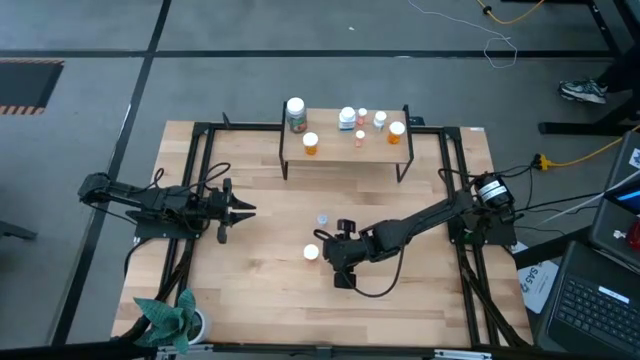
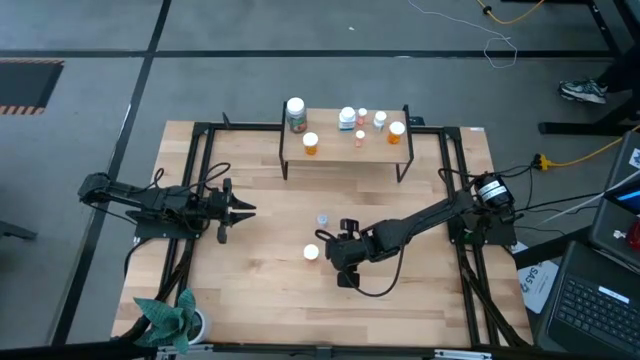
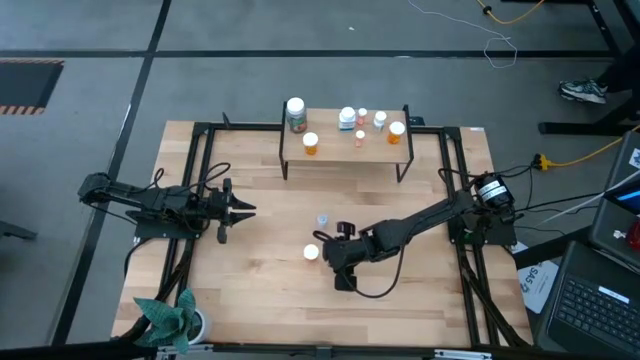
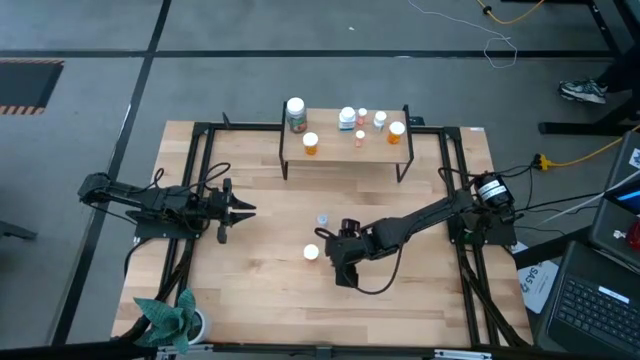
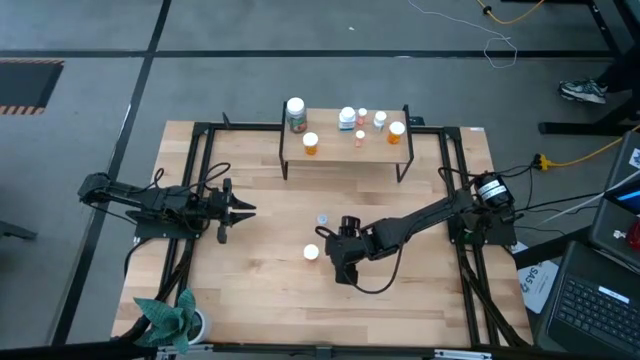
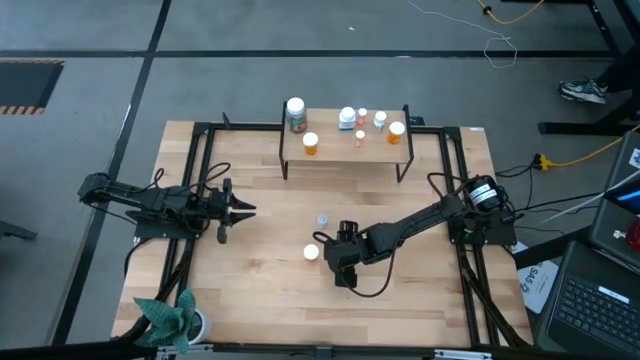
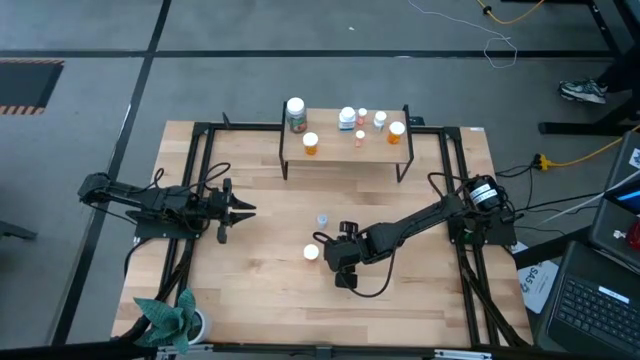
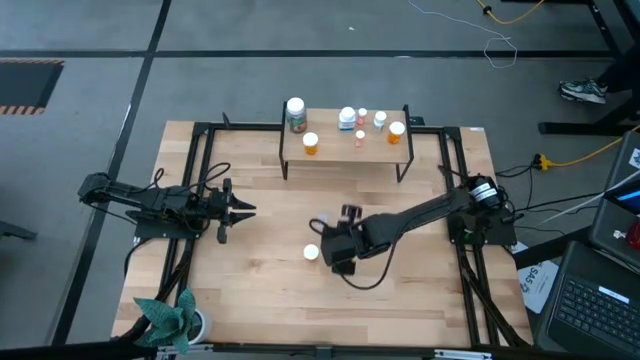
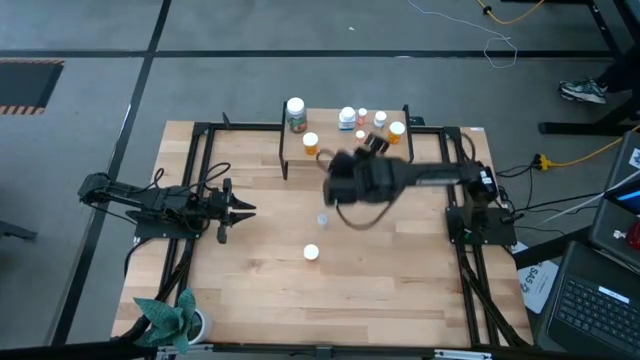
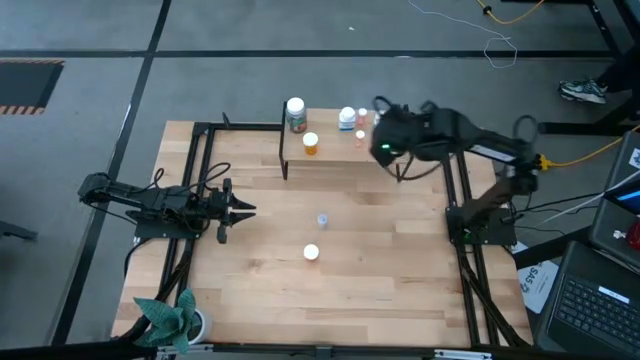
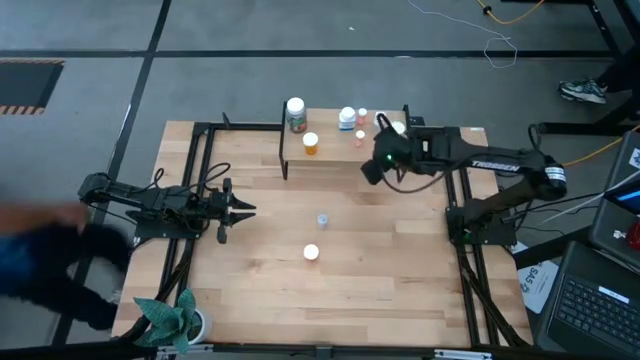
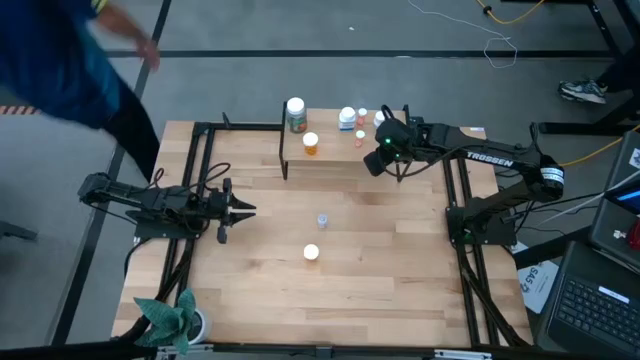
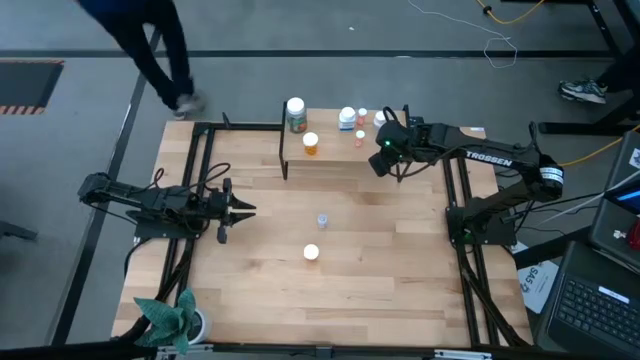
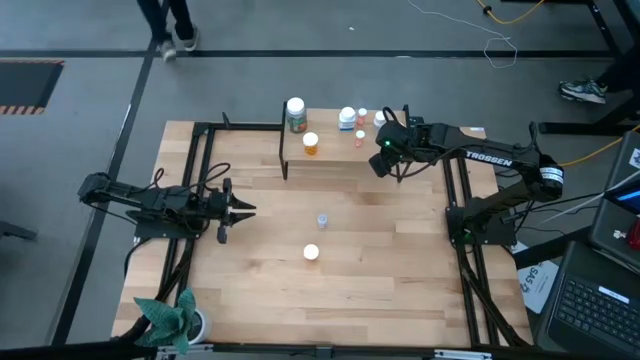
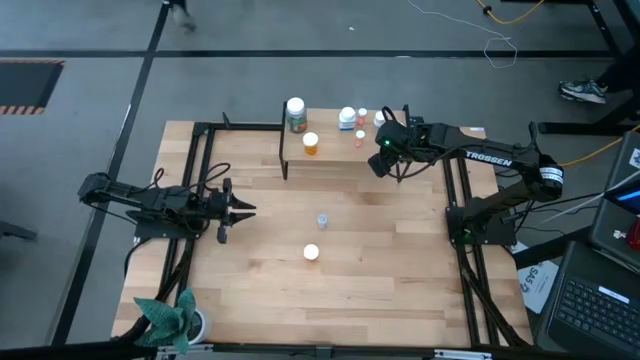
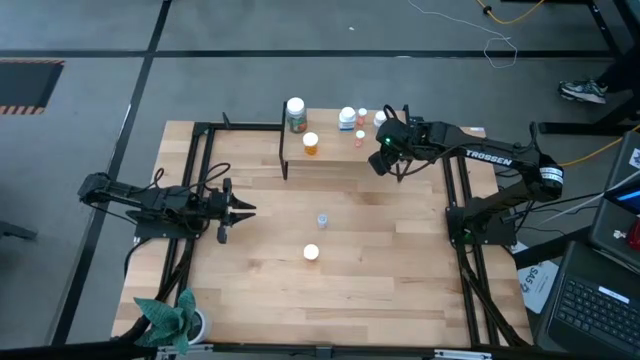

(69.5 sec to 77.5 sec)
Task: Pick and place medicine bottles onto shelf by color
Put the red pill bottle on the shelf

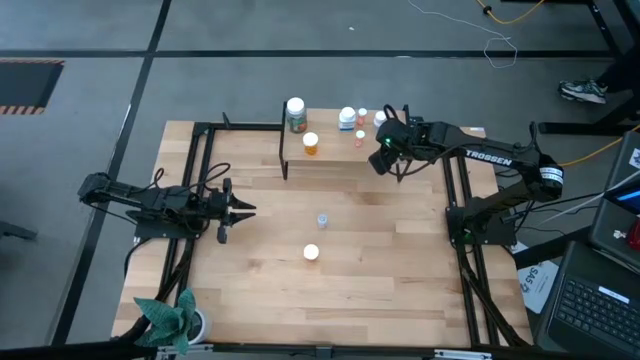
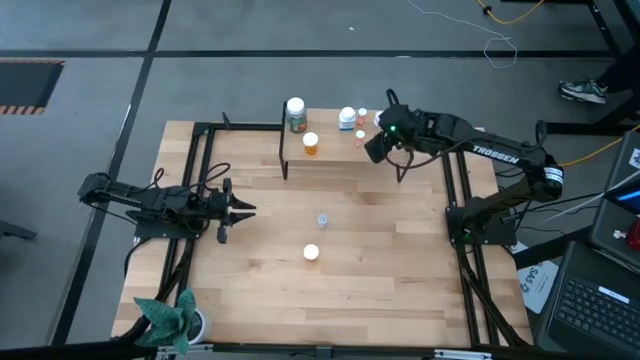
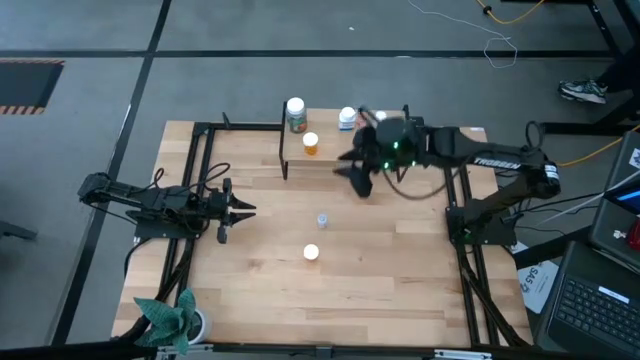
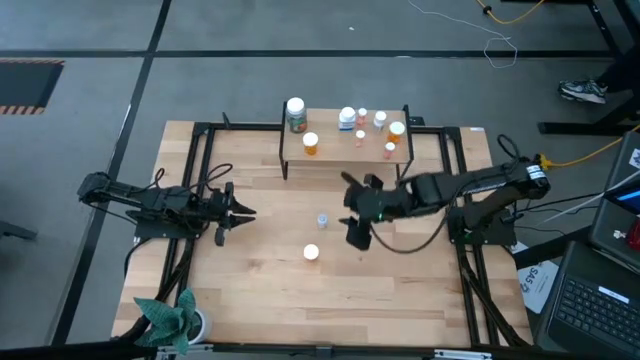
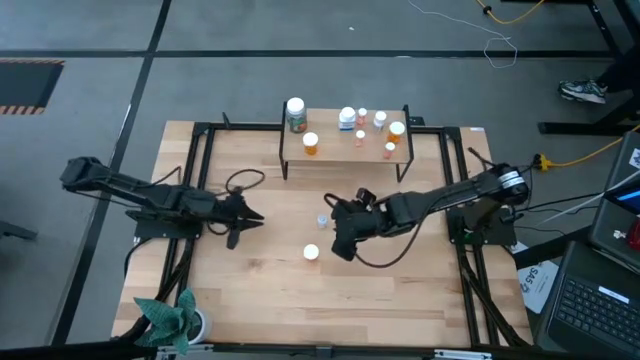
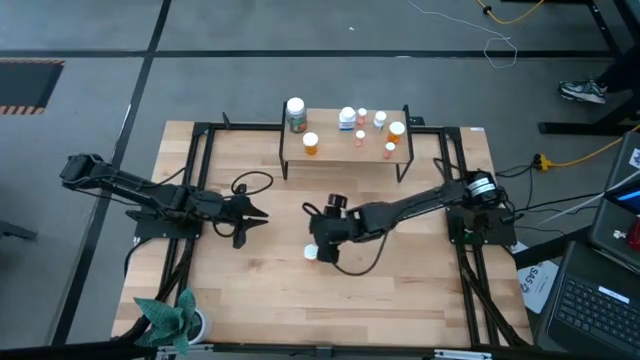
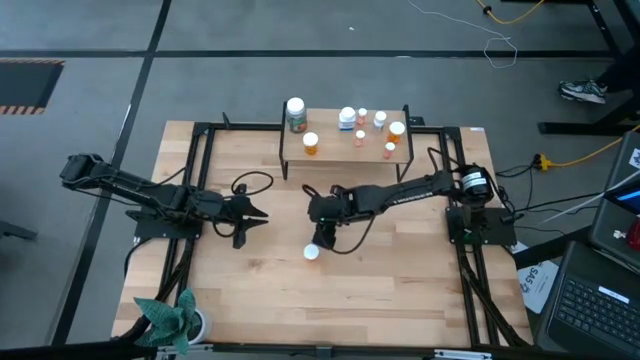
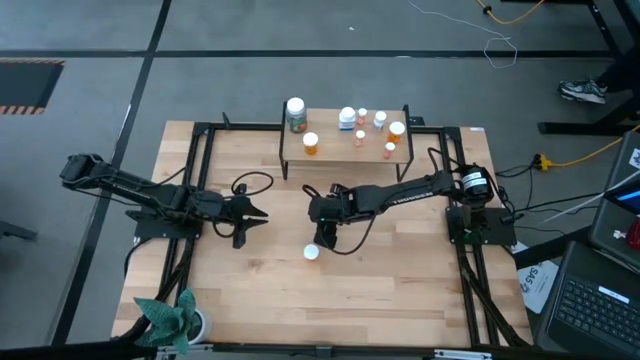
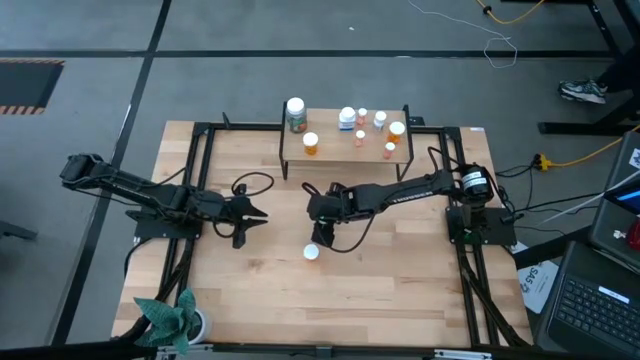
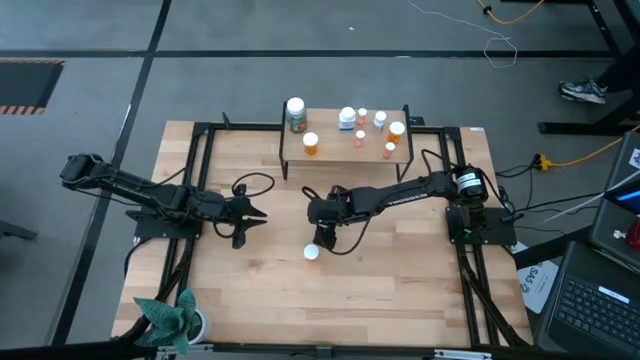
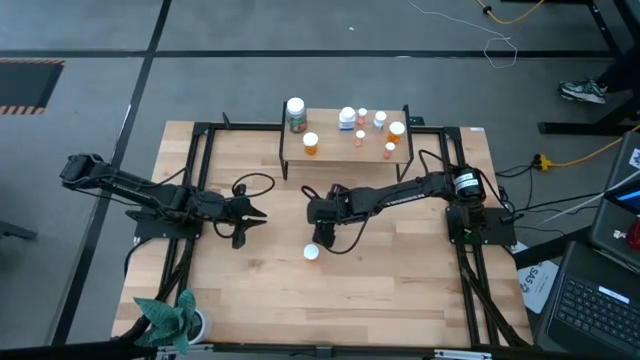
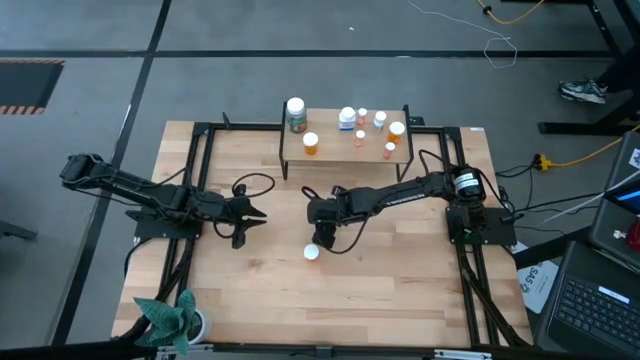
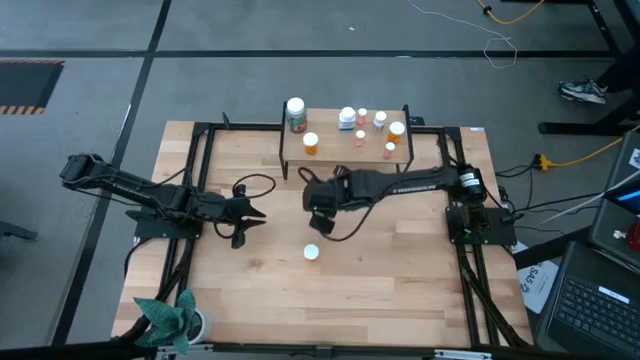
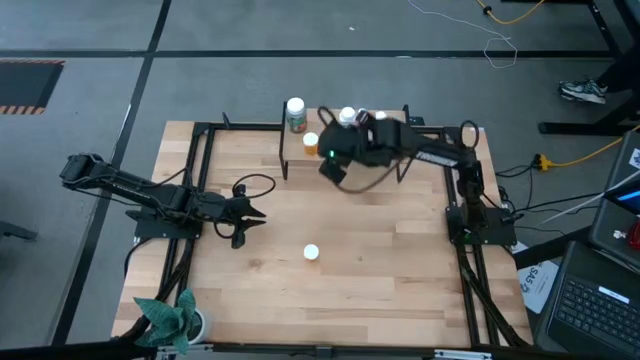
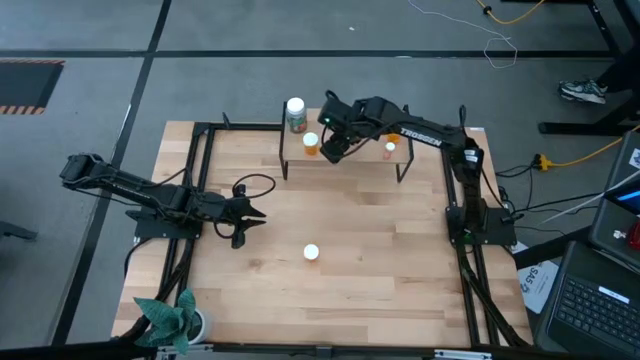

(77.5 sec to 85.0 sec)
Put the transparent pill bottle on the shelf

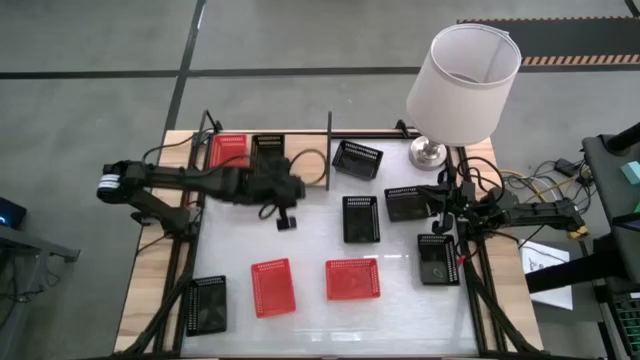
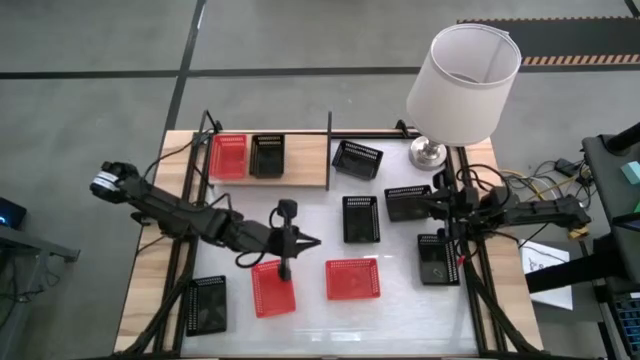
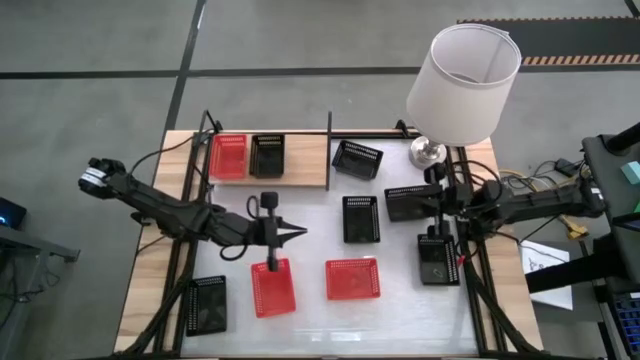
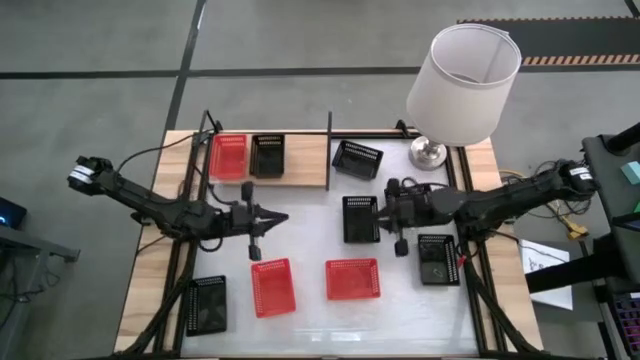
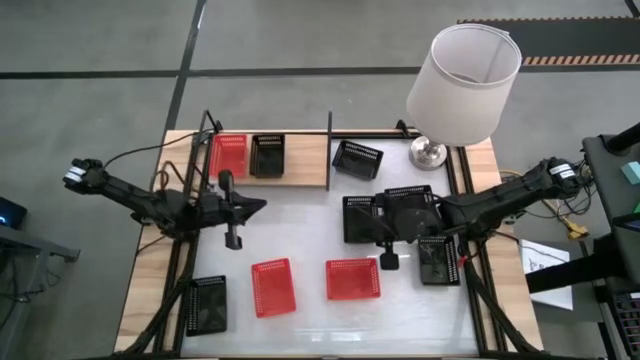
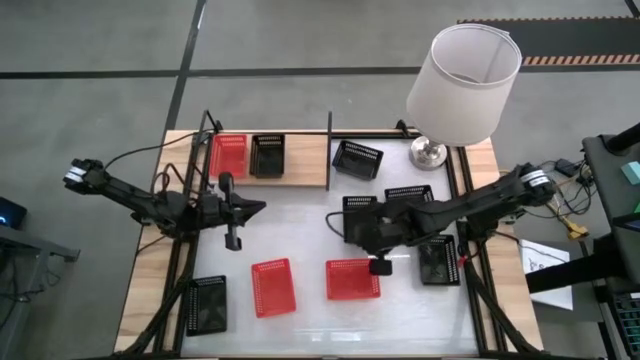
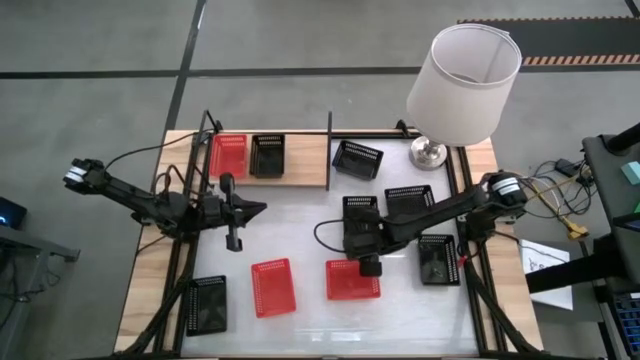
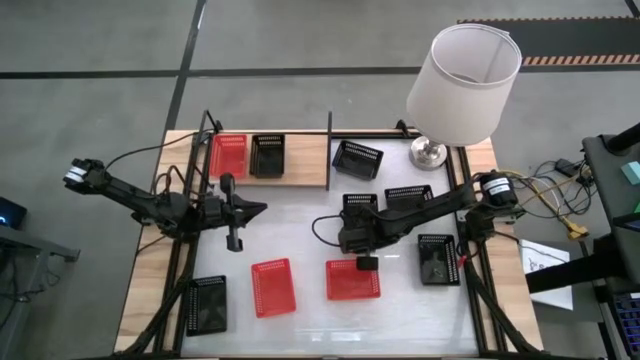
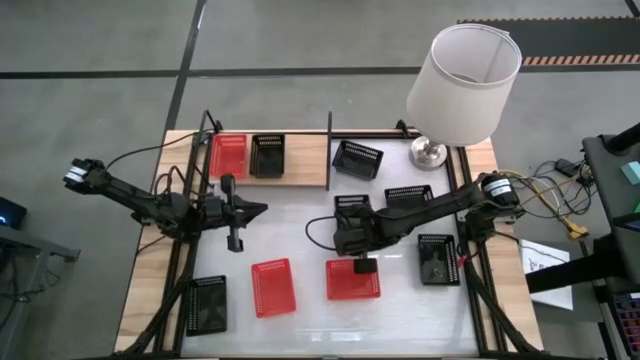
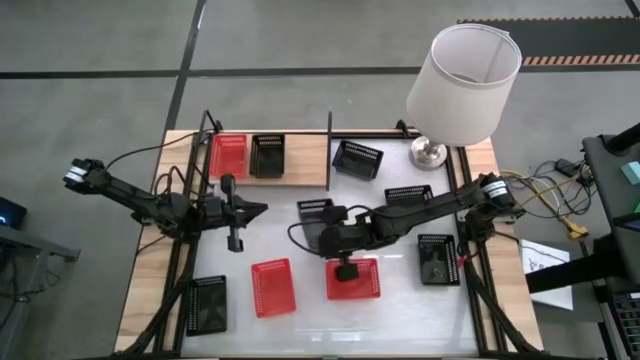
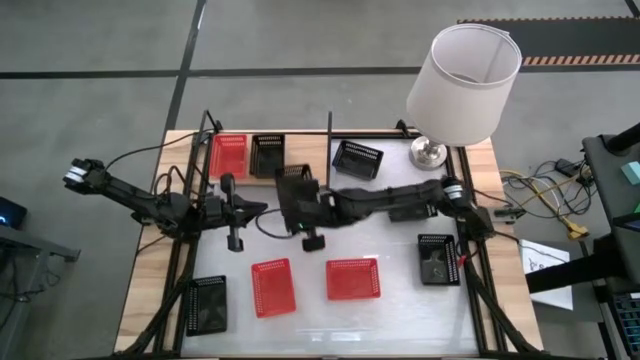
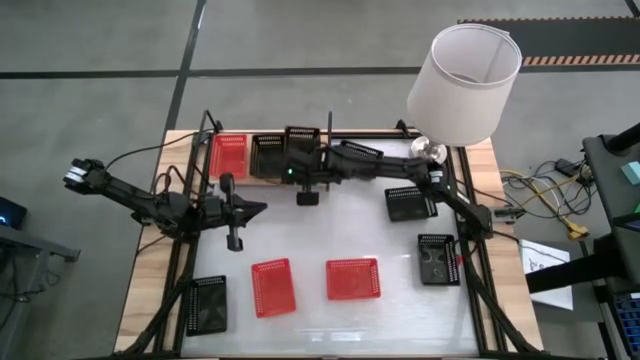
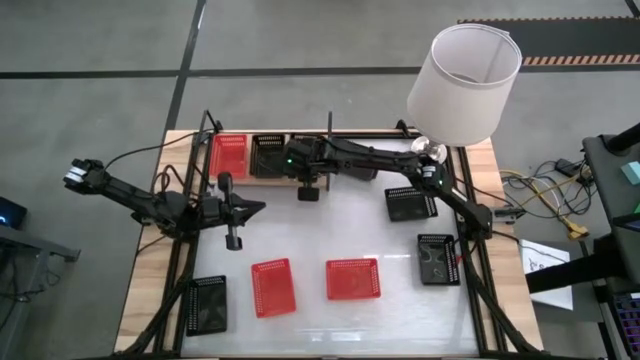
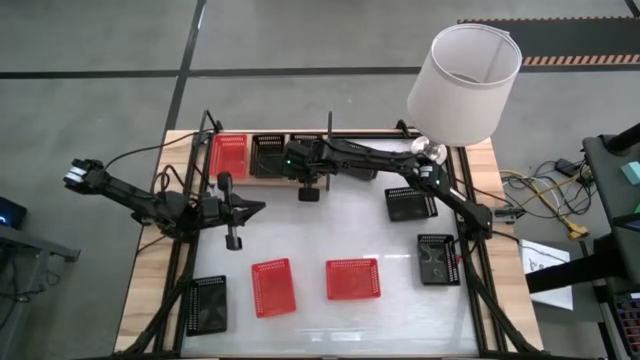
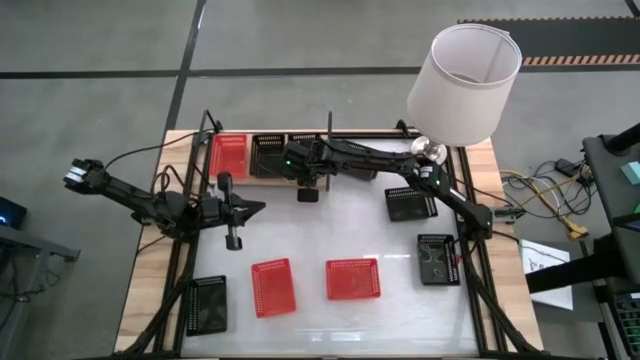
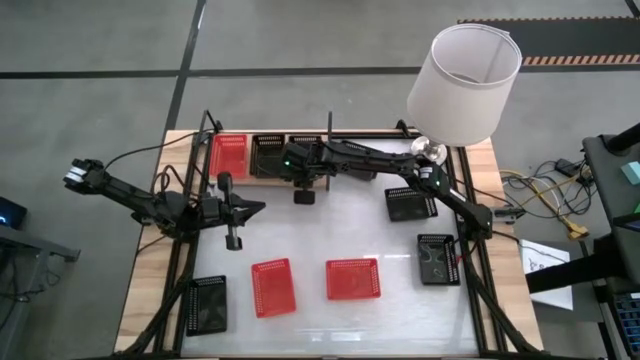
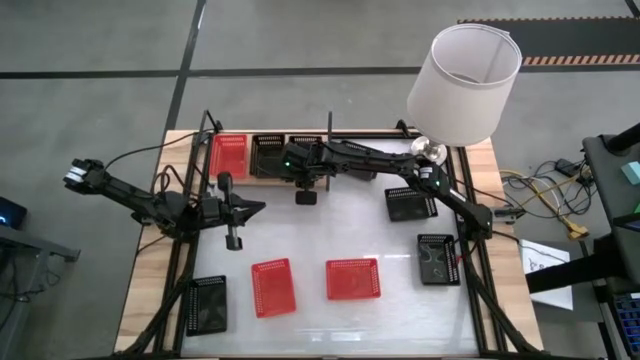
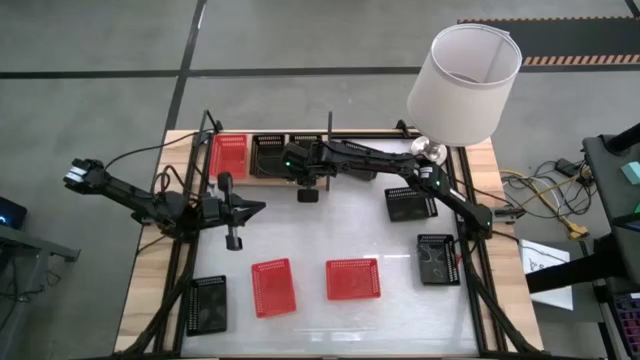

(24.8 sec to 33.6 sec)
Task: Stack baskets on shelf by color
Put the black basket on the shelf
